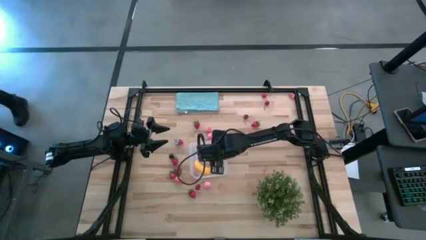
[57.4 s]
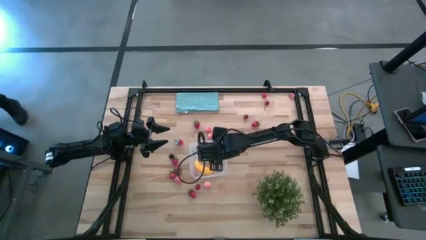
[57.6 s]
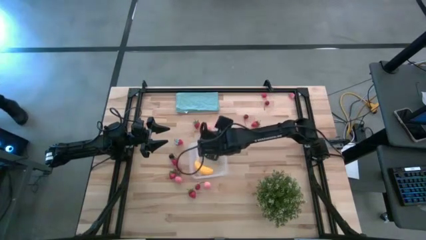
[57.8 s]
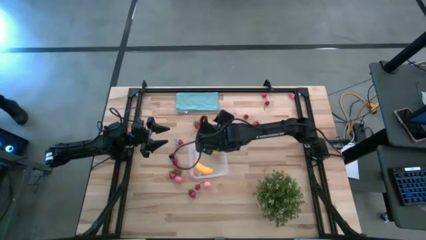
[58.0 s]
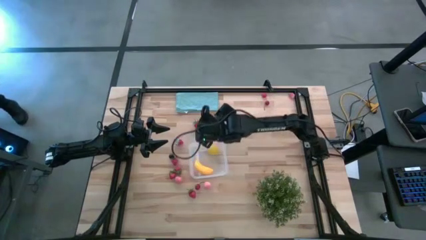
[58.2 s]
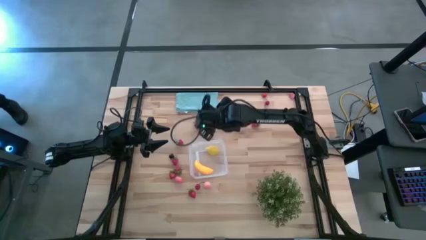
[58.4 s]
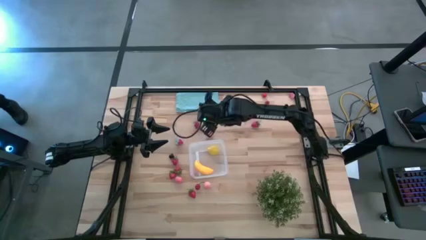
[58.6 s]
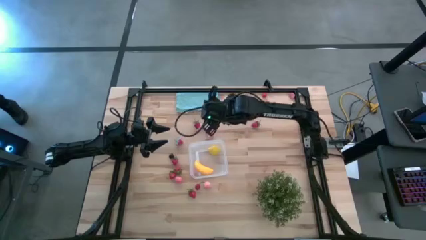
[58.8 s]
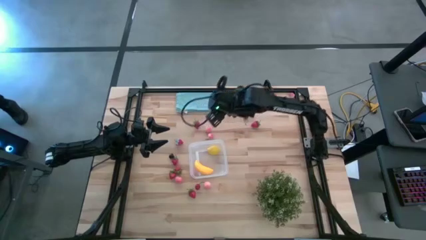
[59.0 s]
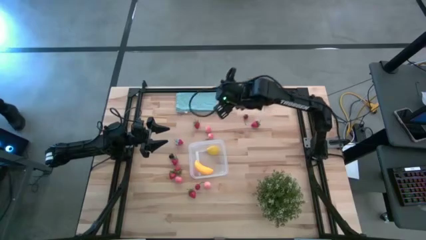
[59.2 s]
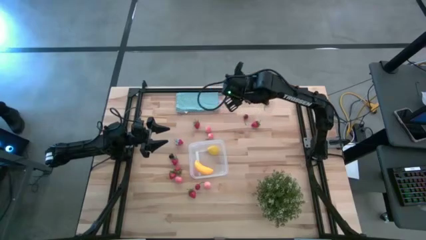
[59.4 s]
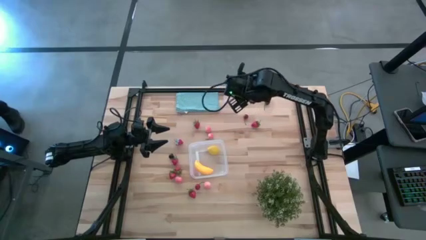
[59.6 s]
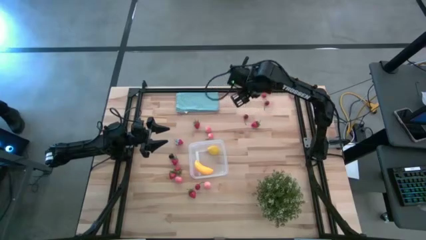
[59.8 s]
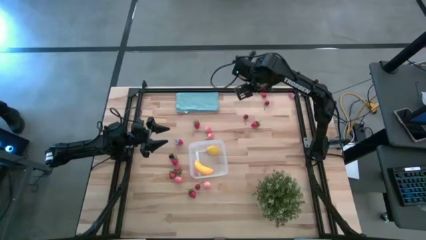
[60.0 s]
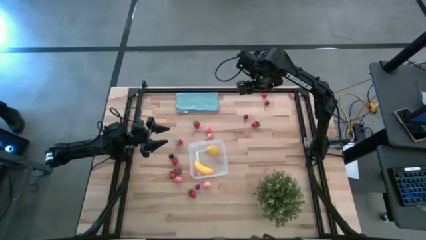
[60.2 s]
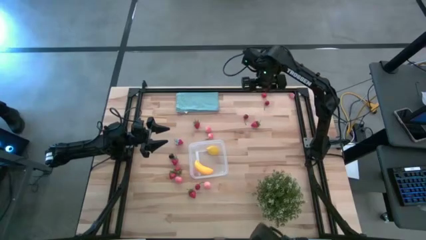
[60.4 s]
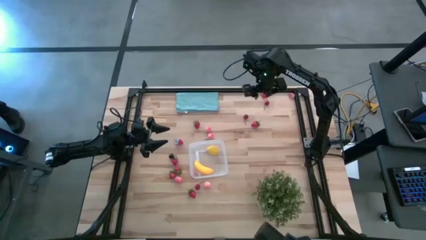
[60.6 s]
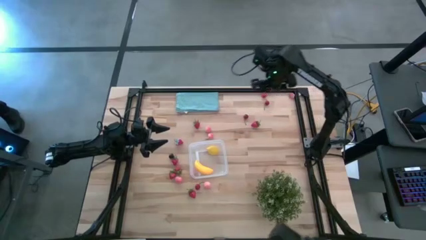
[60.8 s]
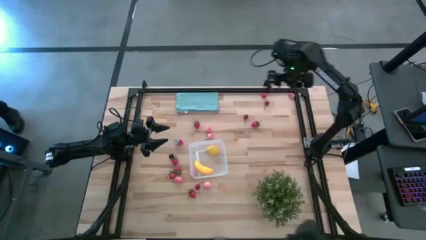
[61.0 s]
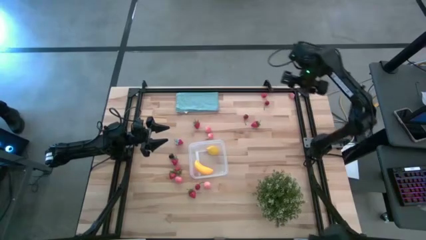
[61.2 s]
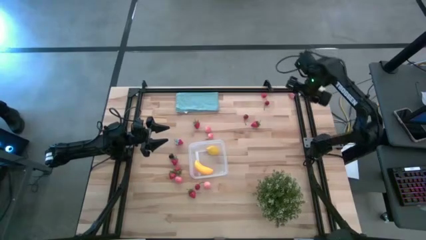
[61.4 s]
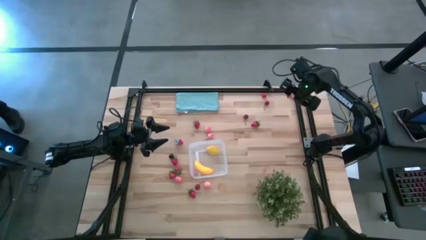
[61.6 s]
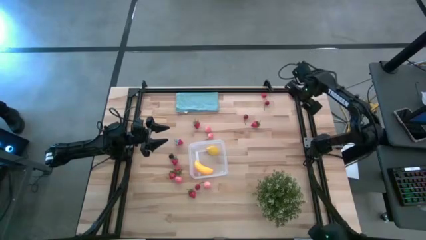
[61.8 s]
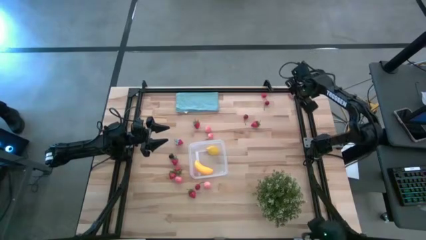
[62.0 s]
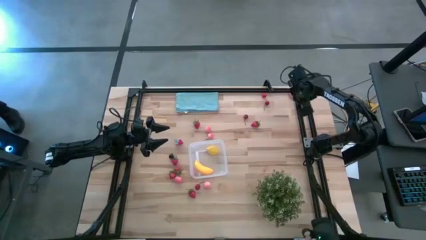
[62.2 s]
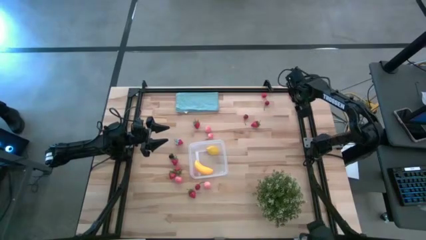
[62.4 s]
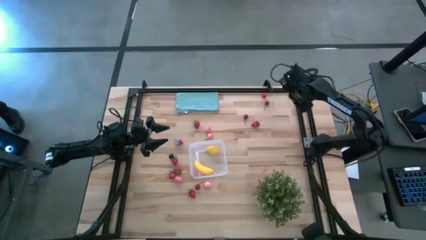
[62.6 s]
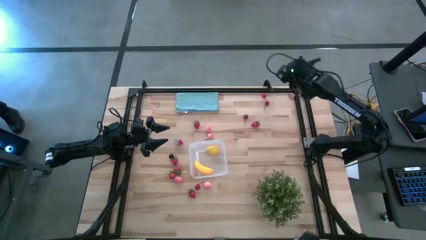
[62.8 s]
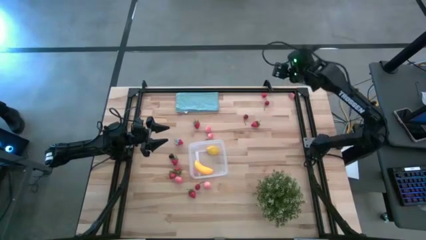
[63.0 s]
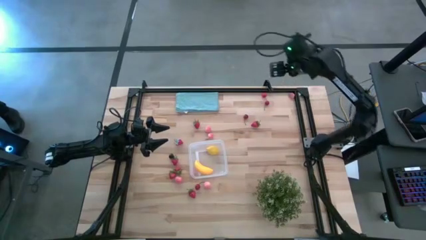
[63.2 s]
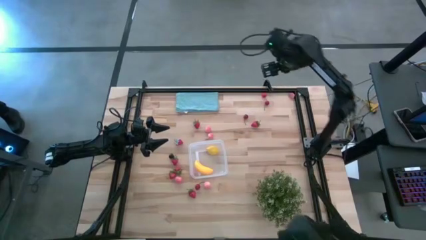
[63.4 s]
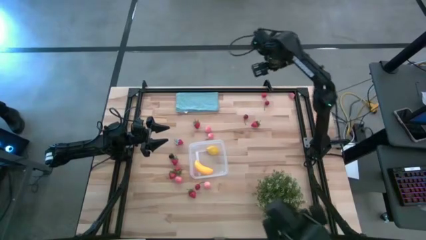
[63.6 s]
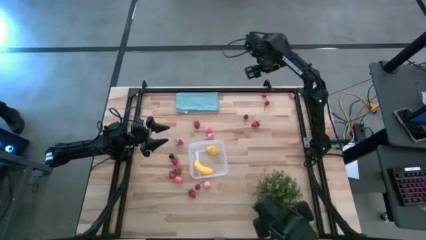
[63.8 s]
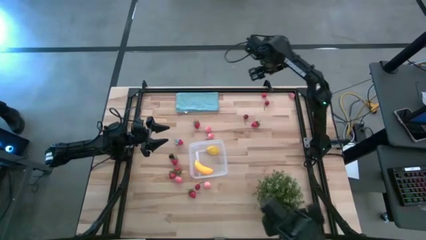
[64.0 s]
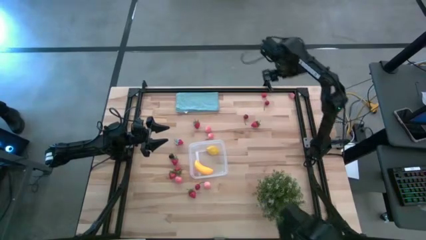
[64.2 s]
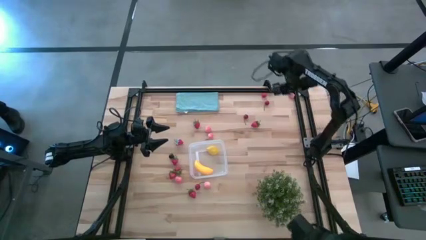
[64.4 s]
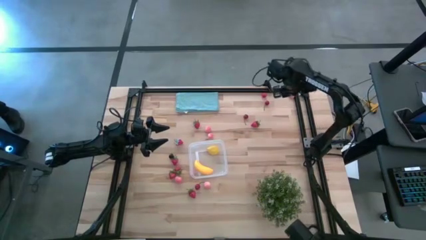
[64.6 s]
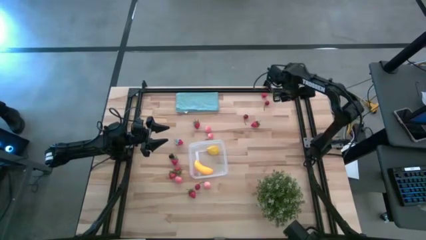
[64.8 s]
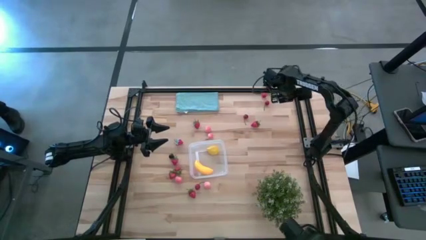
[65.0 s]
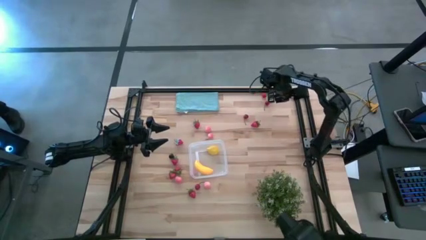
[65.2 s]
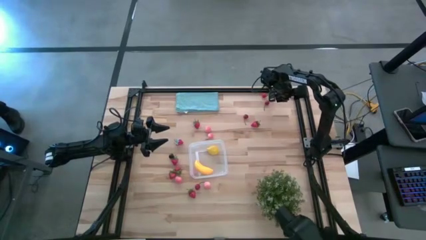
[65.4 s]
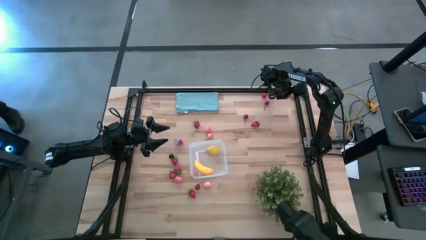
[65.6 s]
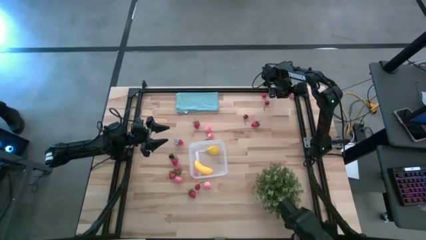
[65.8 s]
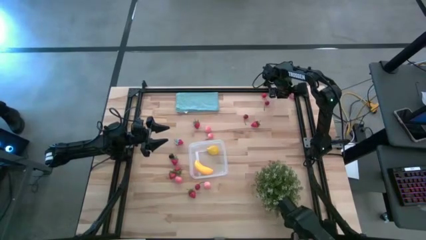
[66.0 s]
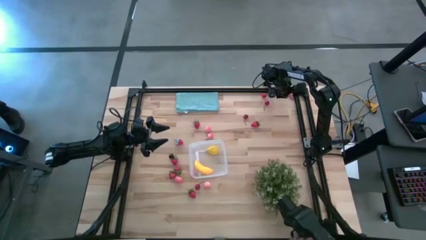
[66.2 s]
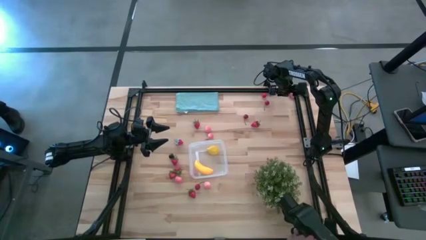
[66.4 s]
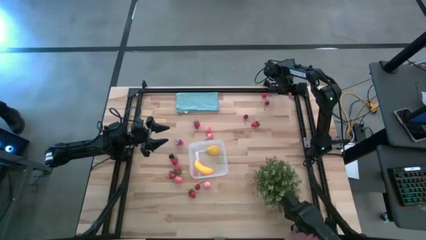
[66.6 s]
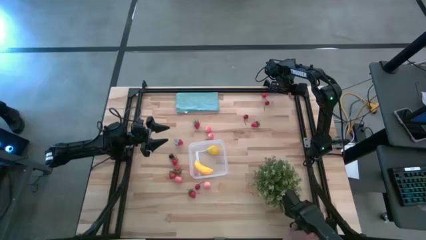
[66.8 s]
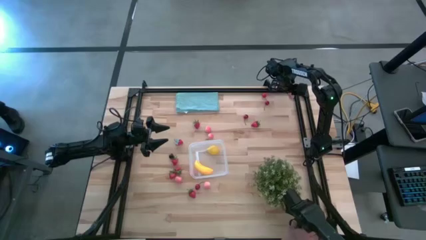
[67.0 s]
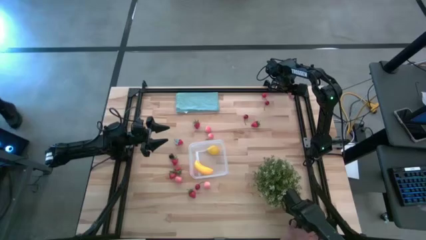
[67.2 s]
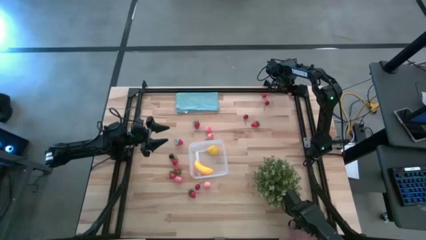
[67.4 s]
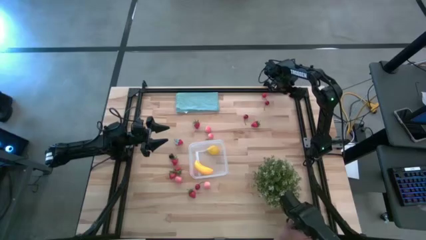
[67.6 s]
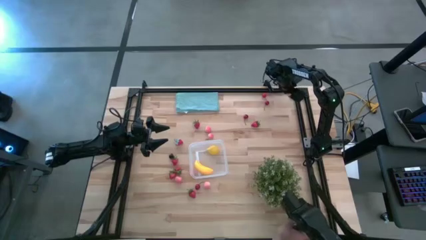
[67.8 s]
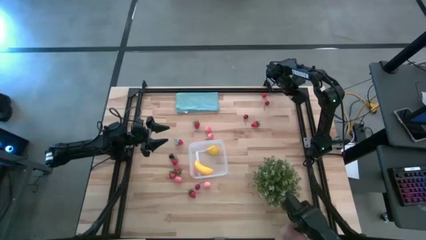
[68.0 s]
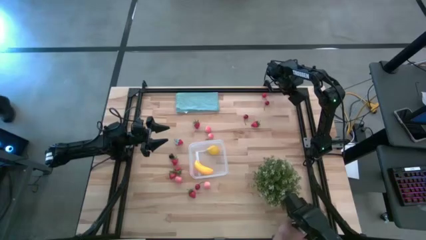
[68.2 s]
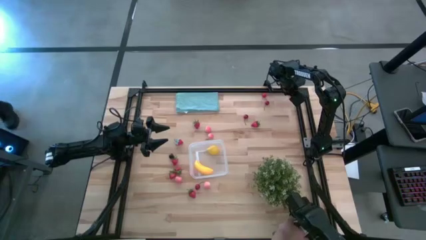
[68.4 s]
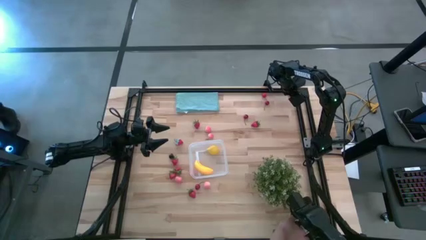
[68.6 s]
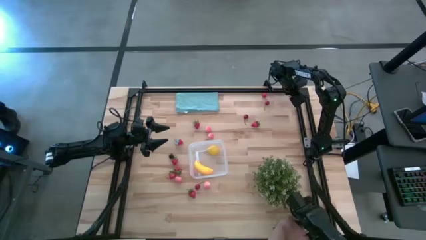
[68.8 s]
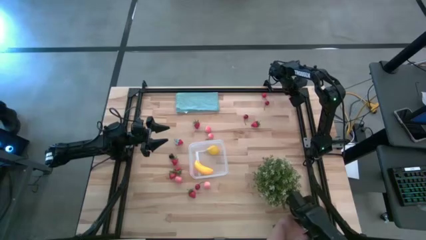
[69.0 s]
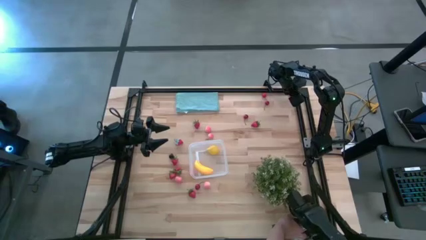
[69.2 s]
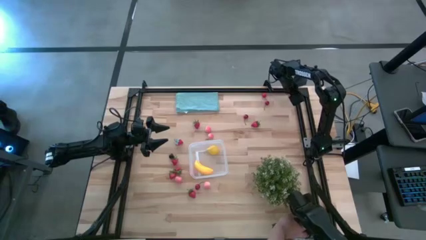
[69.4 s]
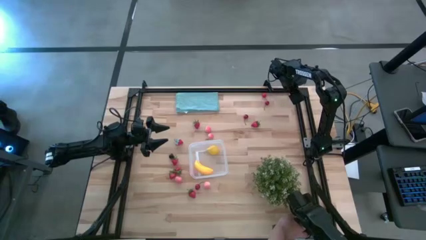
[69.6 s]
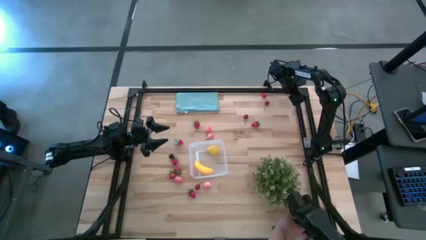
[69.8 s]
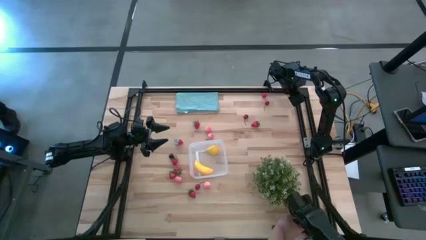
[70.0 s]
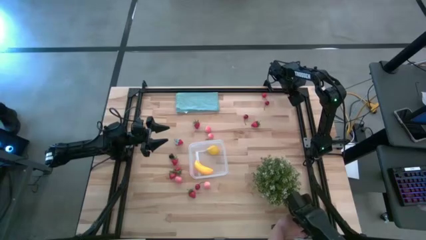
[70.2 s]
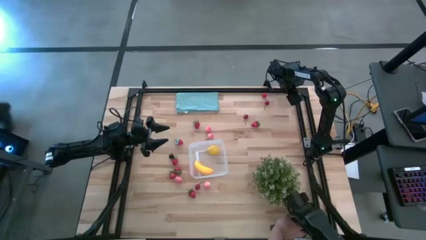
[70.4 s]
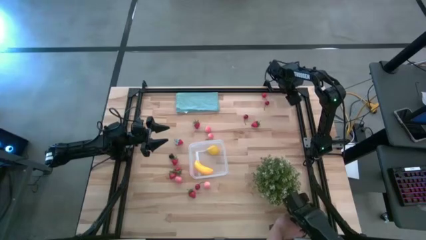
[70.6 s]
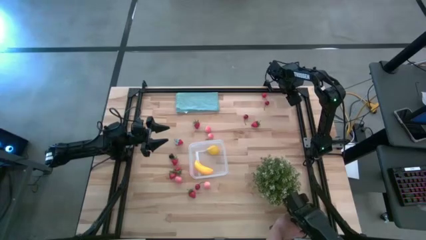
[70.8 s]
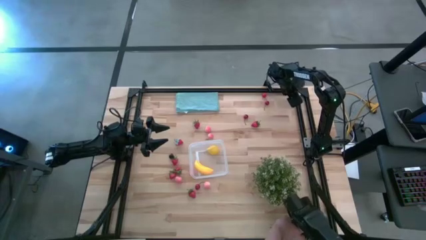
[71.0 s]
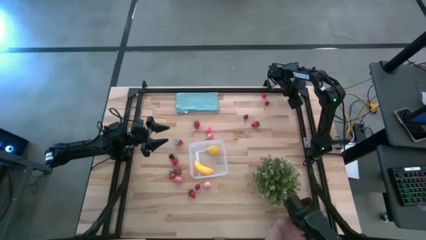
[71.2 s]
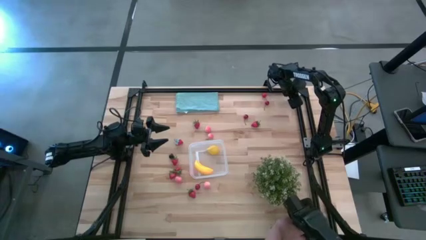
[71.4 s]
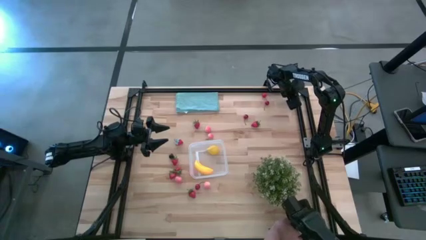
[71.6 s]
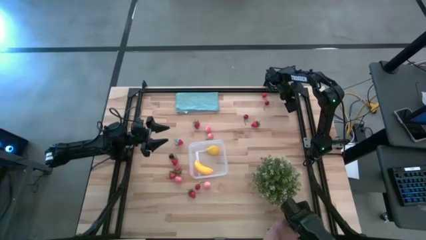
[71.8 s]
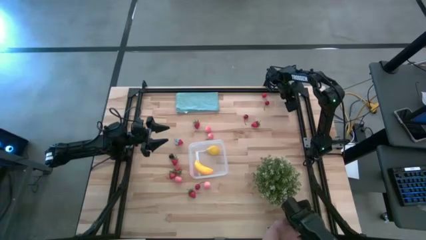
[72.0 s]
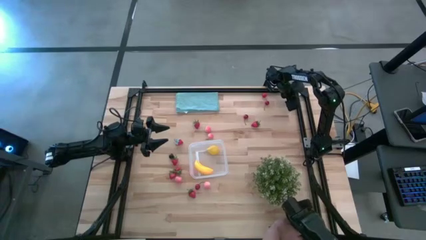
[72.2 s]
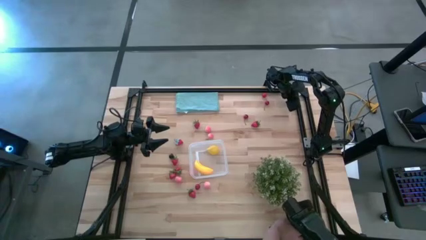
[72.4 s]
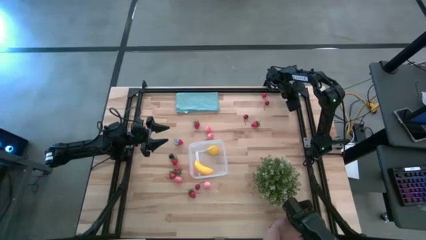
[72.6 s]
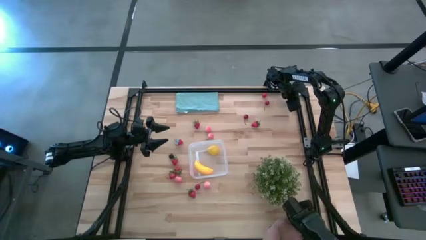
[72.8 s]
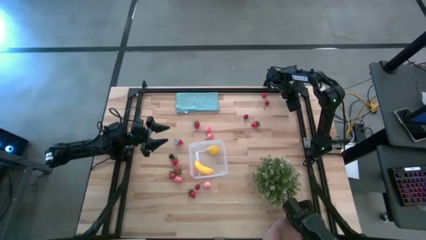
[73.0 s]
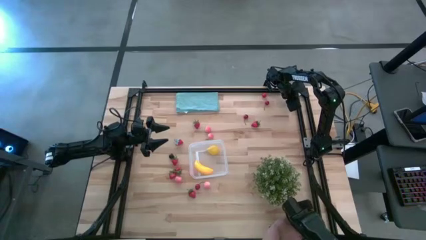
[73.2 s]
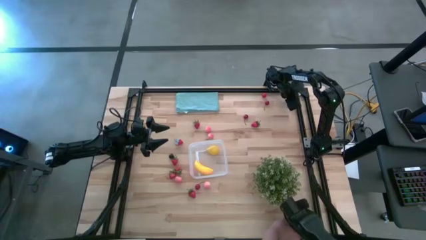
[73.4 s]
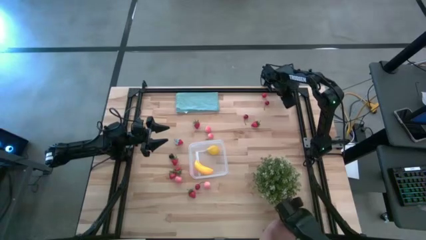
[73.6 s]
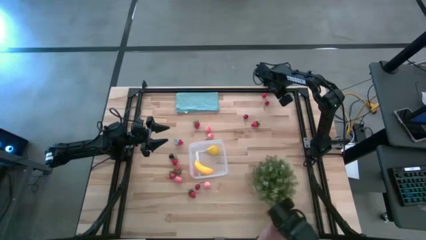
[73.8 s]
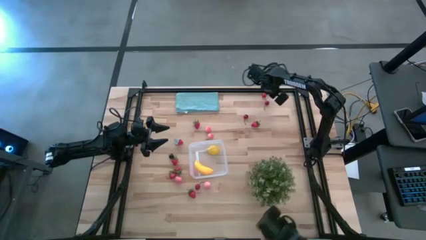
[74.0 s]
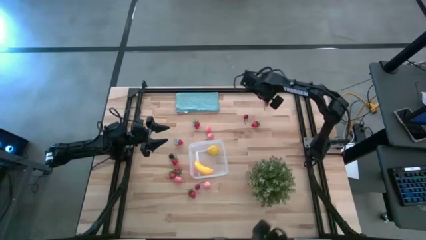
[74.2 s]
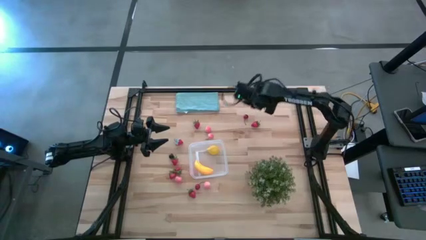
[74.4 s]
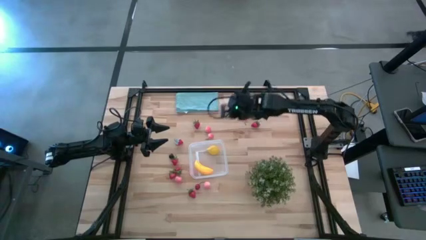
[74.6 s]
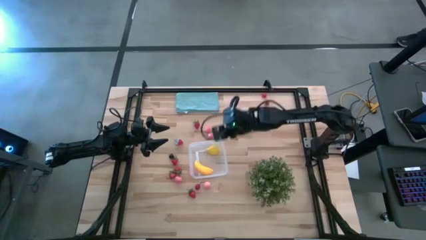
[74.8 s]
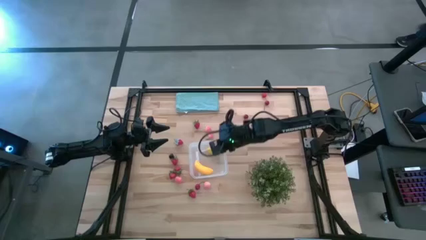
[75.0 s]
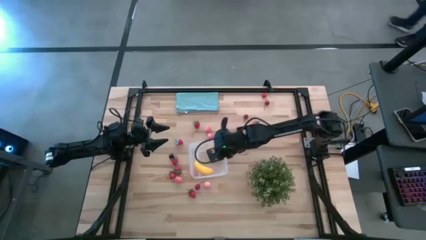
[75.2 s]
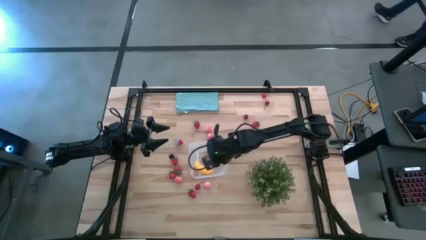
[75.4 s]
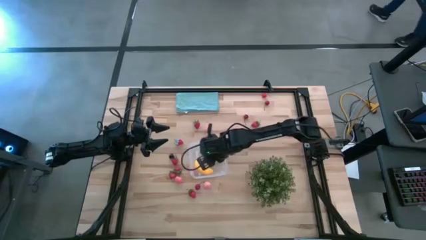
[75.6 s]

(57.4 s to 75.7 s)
Task: Pick and placing Produce into tupperware
Put the pink peach into the transparent bin
